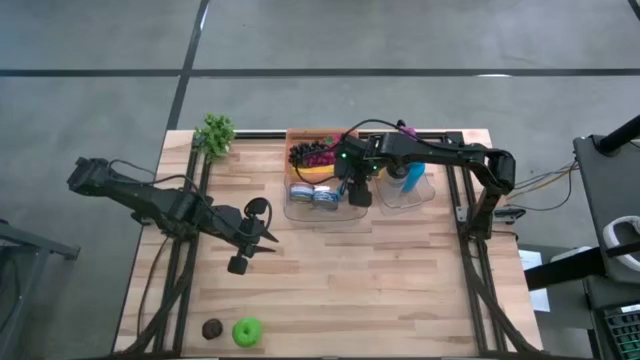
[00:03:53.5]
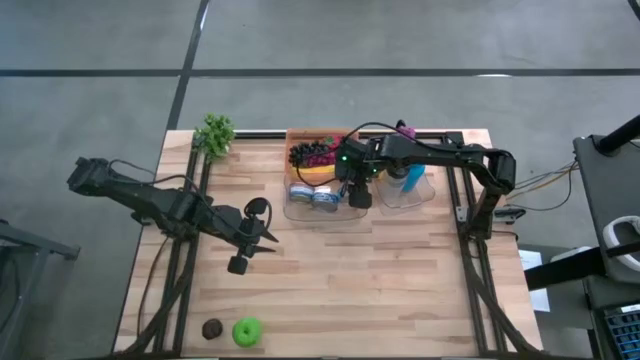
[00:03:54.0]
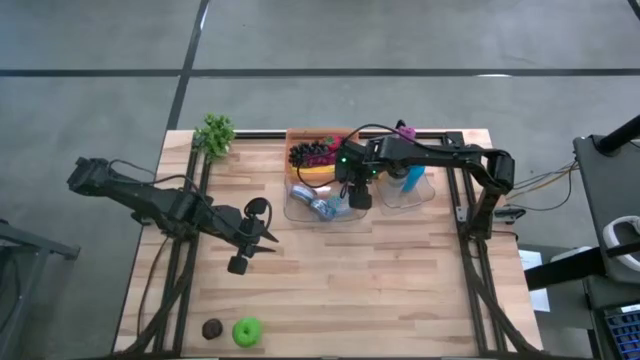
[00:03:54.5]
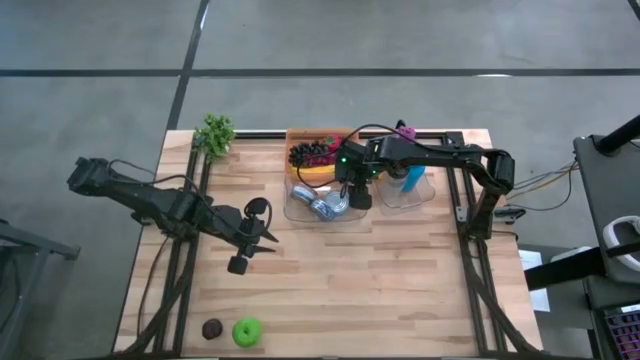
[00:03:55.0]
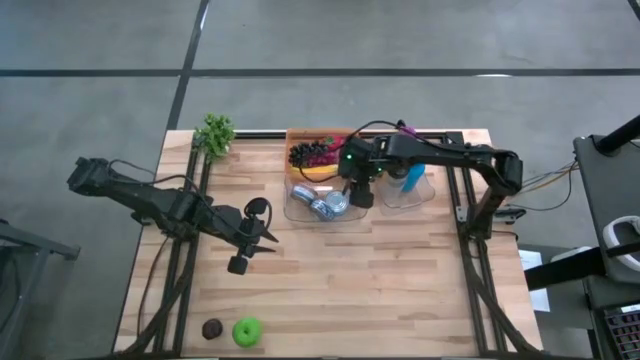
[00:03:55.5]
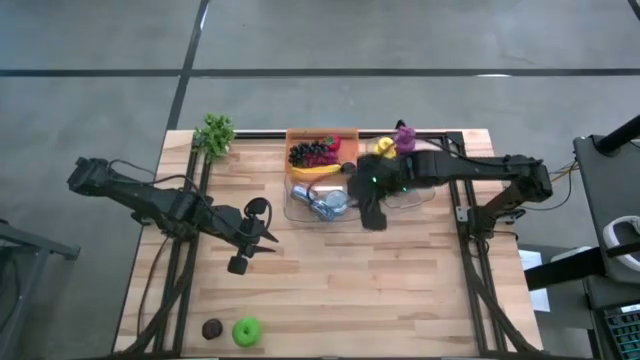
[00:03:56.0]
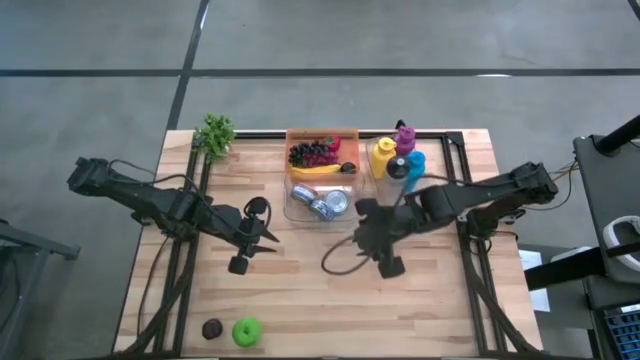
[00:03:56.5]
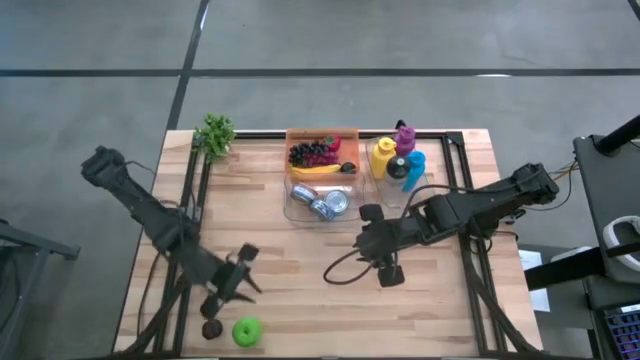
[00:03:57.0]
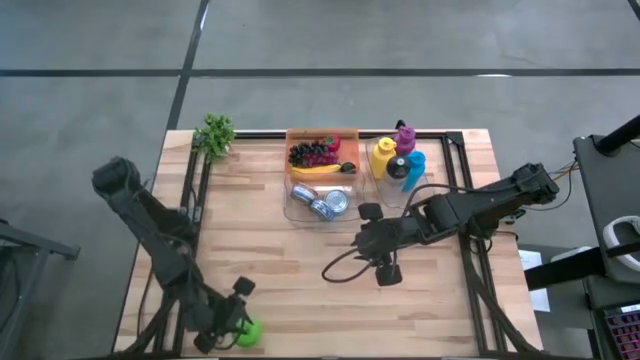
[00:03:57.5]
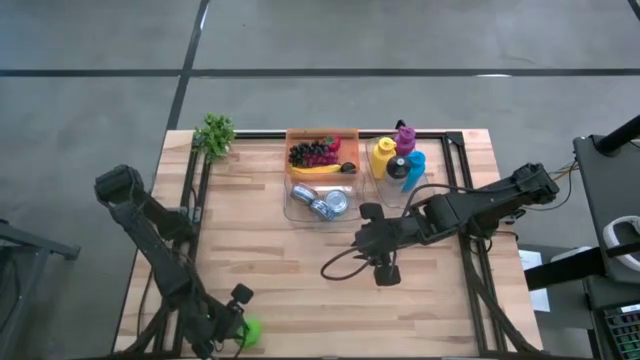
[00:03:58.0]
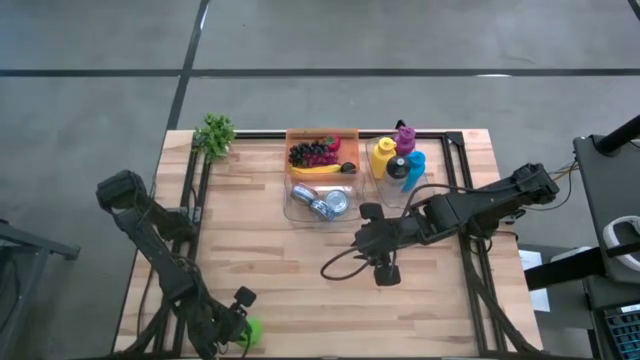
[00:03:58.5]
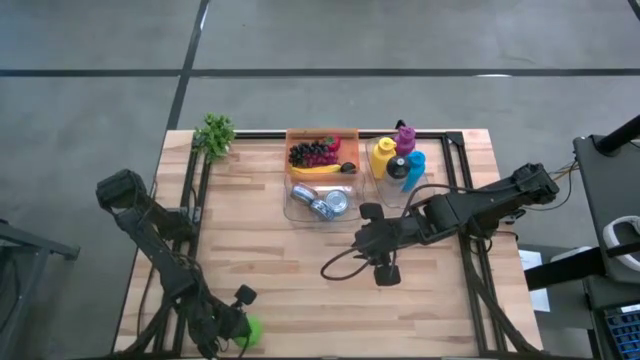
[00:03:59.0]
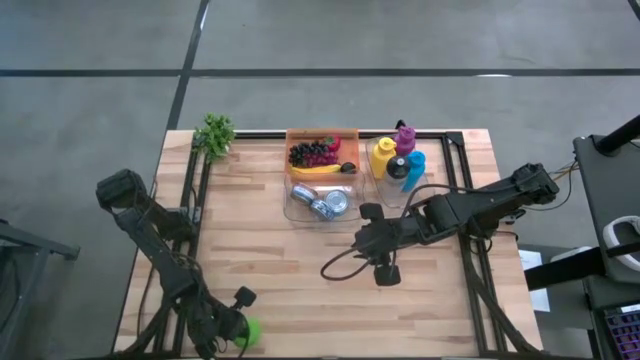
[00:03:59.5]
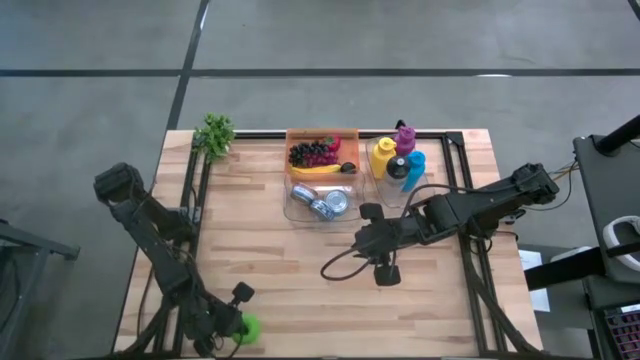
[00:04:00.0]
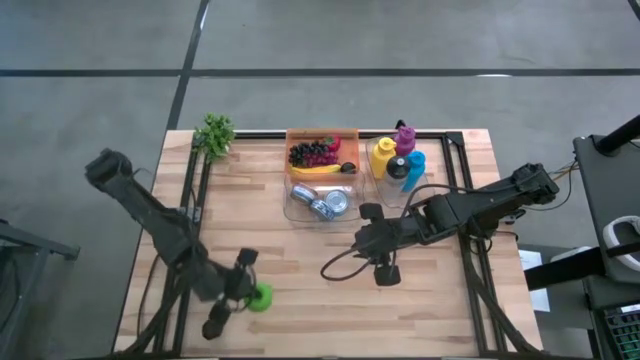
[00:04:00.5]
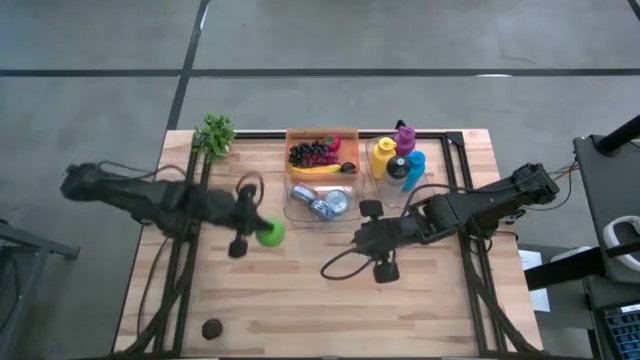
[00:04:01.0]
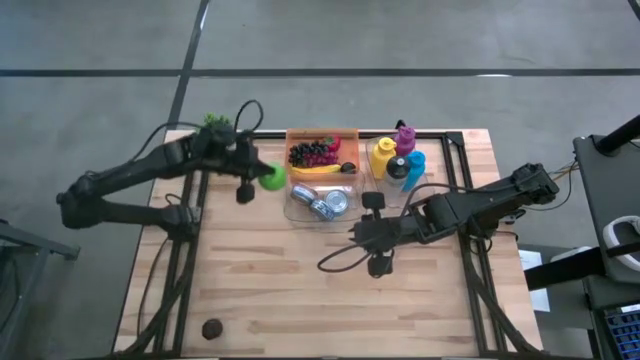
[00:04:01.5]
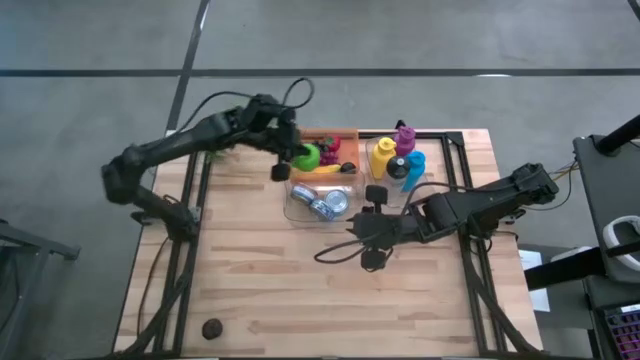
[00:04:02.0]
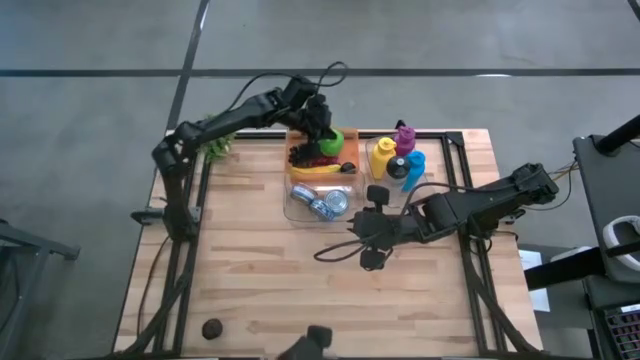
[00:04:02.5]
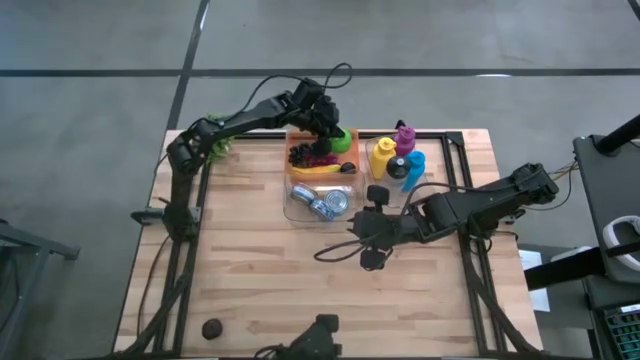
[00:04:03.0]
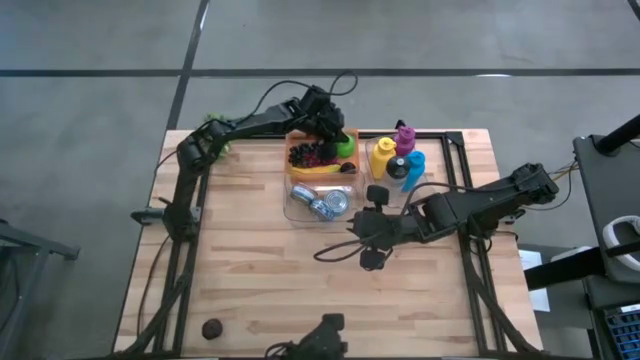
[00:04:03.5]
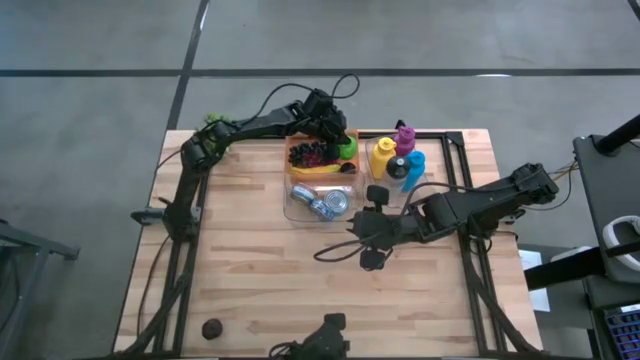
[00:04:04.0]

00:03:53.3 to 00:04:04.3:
Task: Pick & Place Food Item
Put the green apple into the orange bin

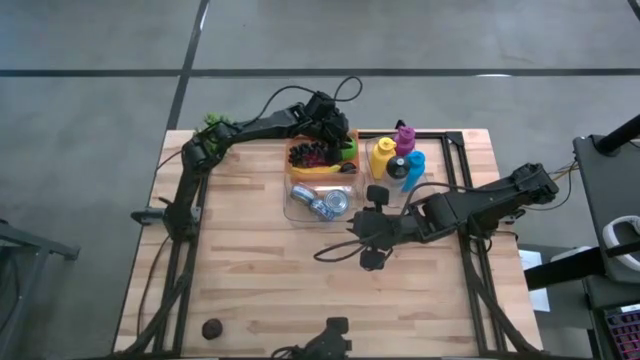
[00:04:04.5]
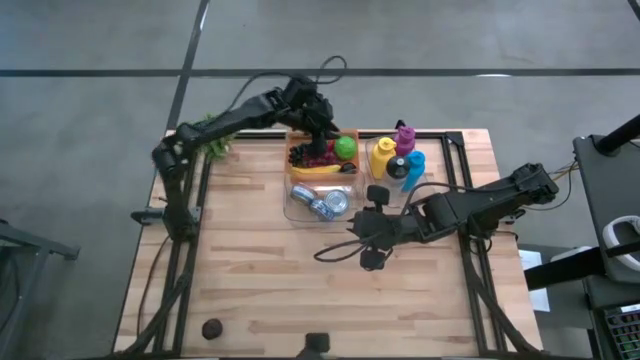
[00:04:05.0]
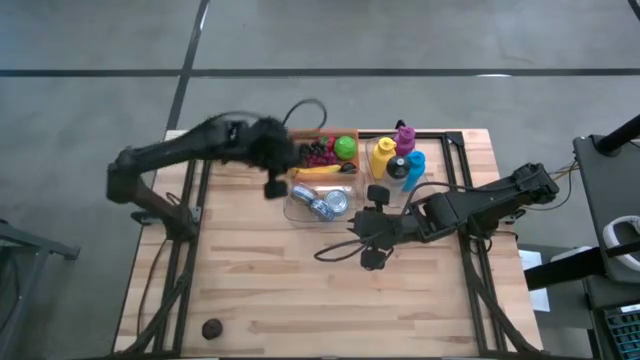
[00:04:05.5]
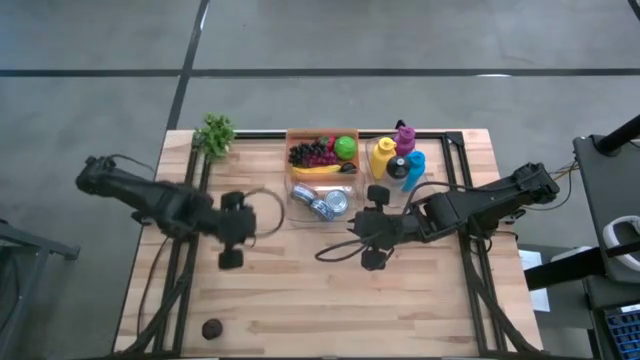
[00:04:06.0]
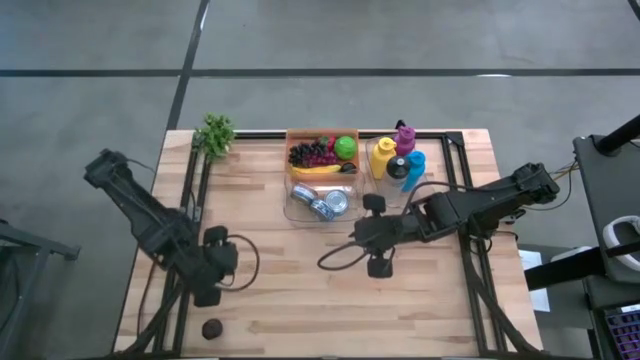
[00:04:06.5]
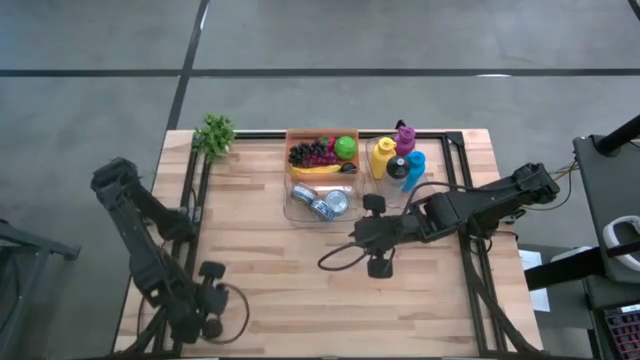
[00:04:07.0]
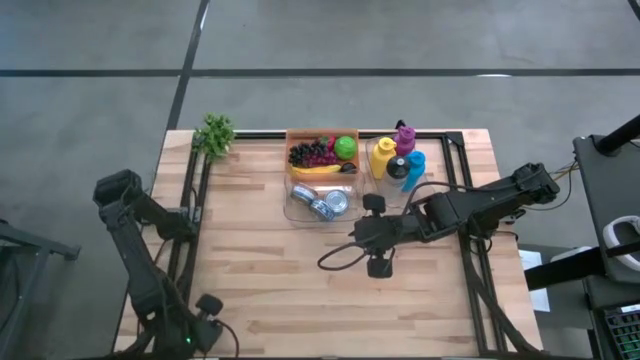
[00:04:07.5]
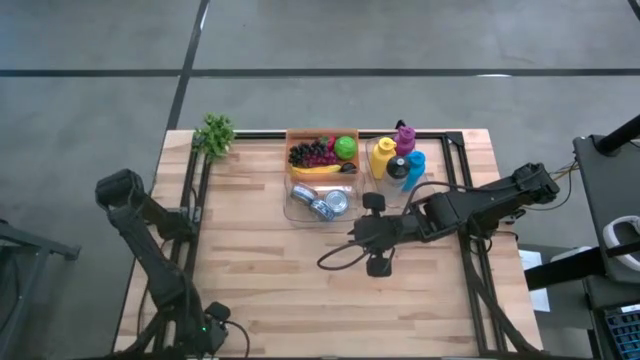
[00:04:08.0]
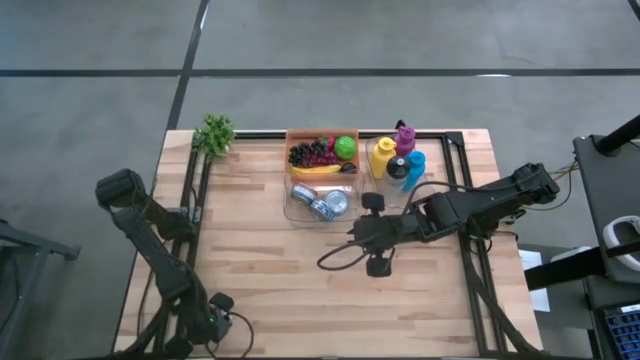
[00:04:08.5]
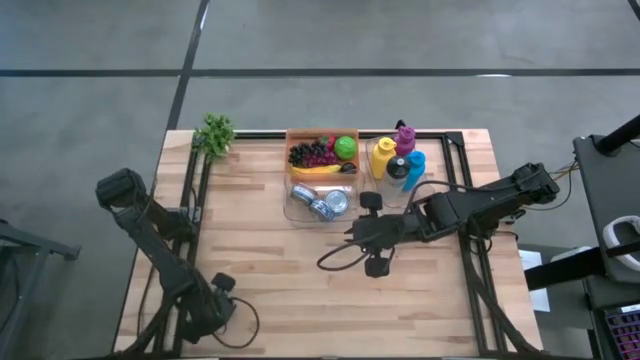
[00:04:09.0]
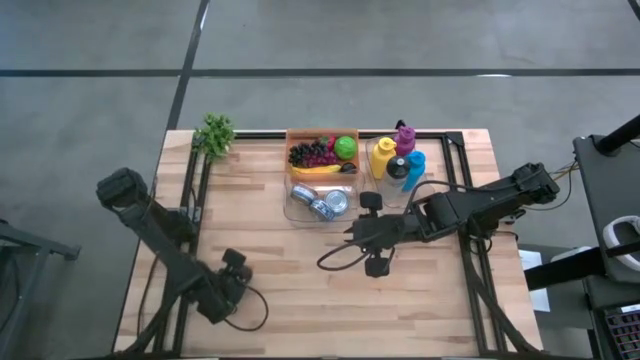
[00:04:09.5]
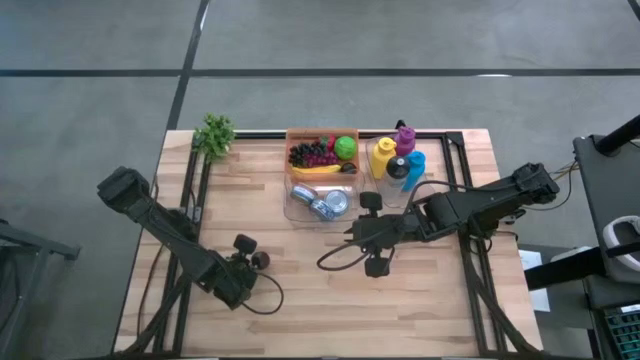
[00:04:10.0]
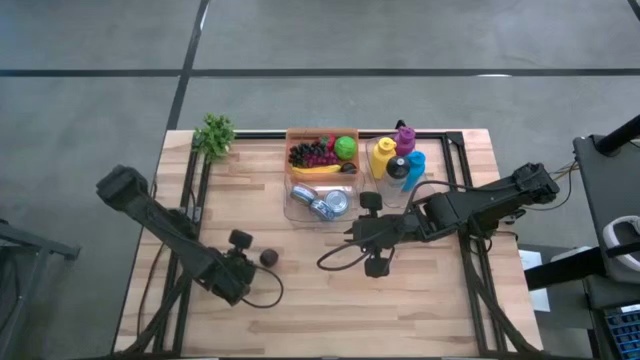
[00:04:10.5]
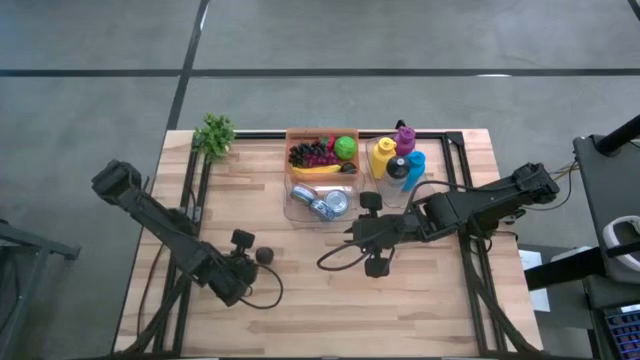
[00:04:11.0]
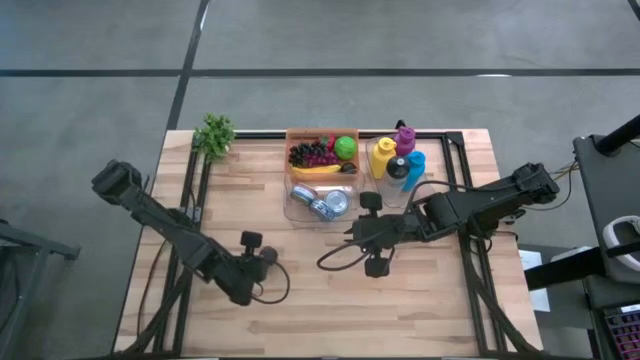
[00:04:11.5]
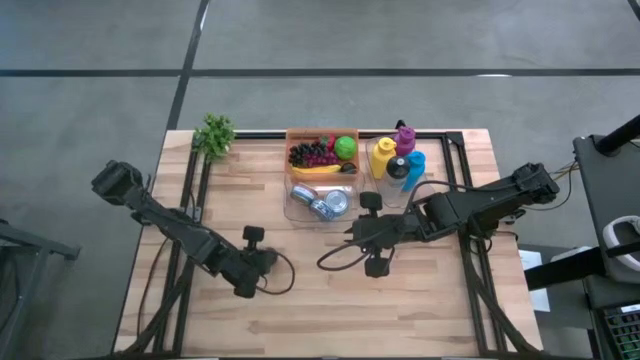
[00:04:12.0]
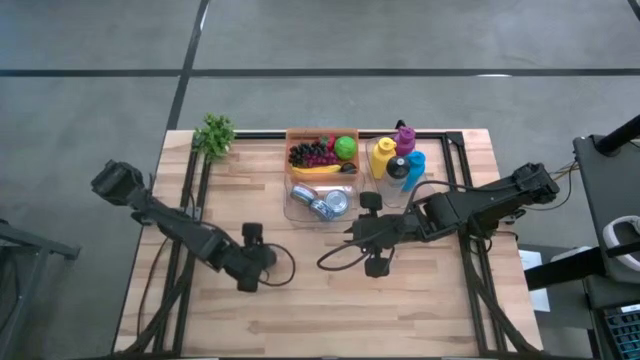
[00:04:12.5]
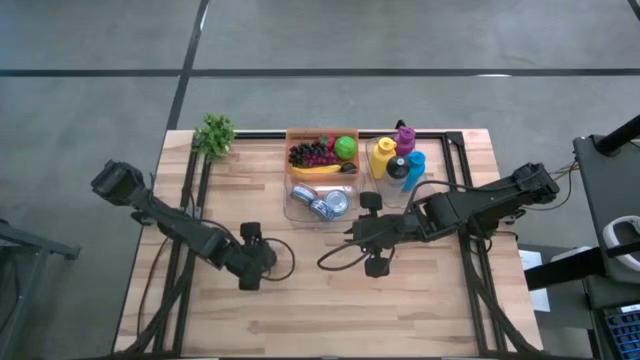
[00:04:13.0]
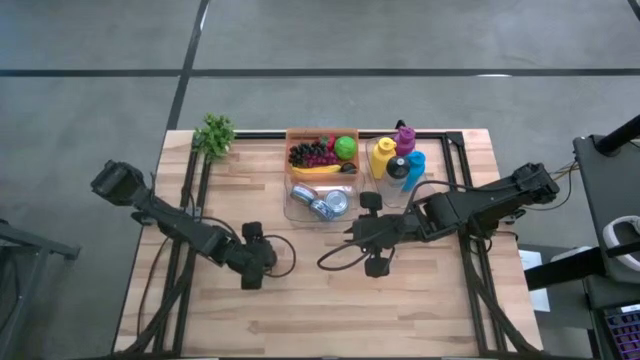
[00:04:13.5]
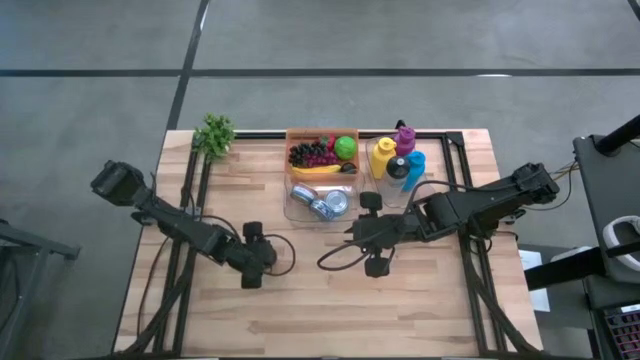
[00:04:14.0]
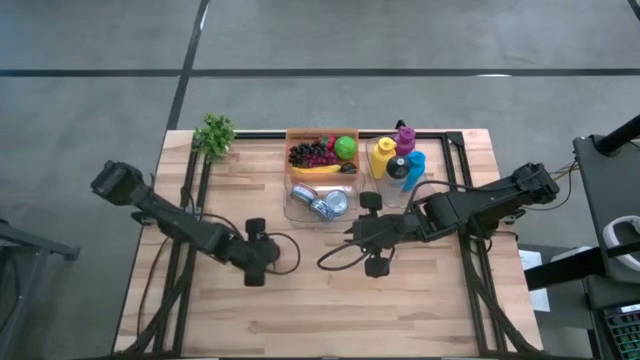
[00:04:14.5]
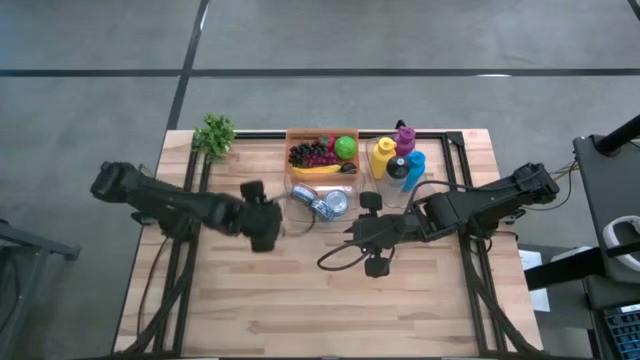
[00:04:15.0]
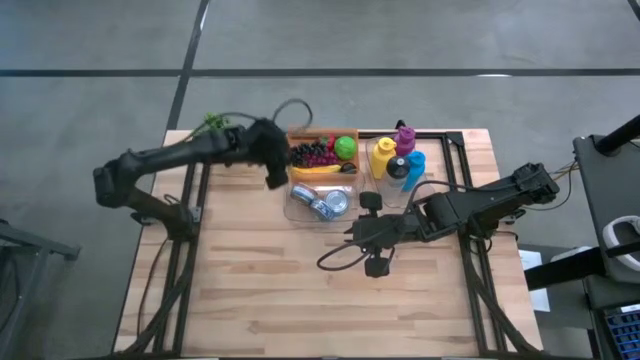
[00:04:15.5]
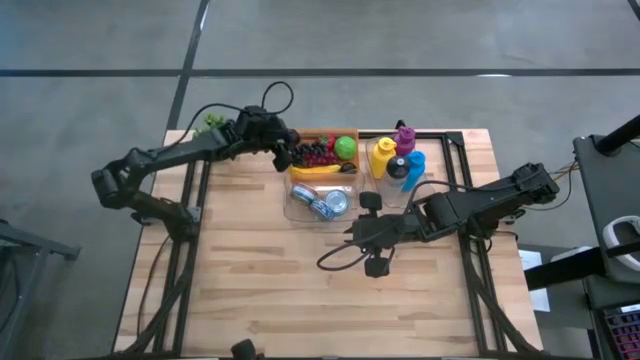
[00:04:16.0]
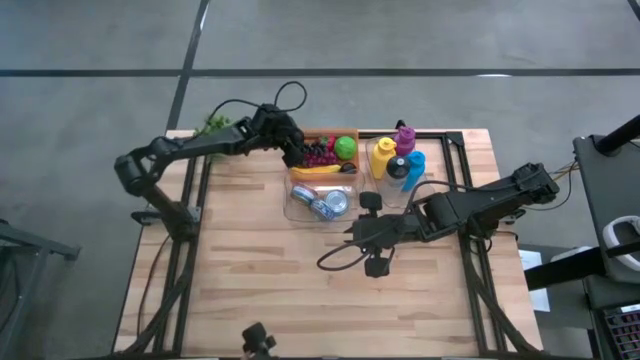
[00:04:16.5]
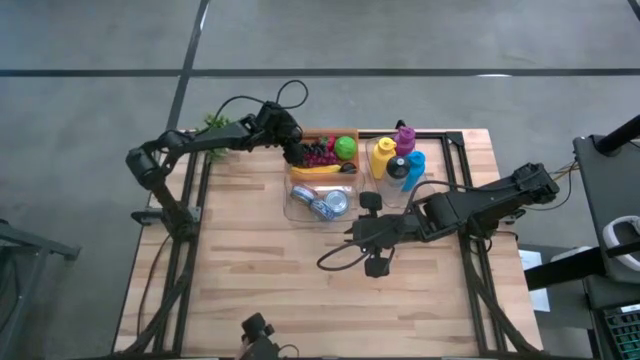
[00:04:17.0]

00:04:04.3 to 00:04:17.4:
Put the plum into the orange bin
